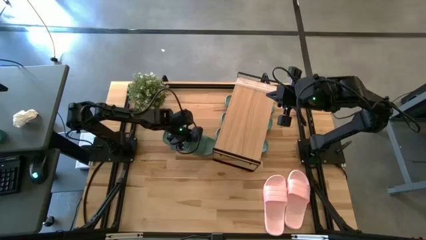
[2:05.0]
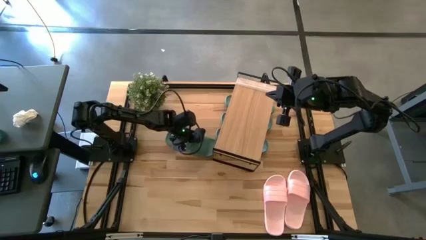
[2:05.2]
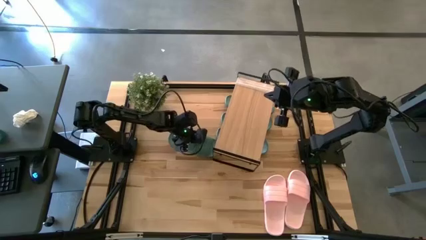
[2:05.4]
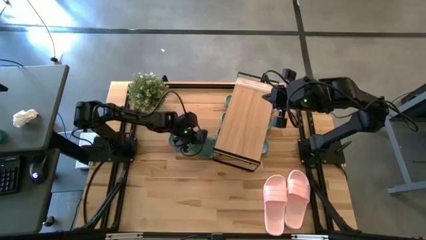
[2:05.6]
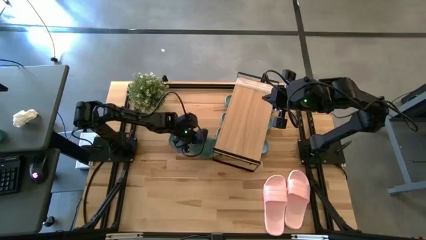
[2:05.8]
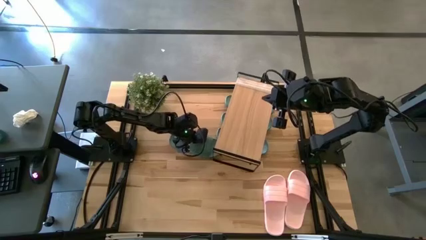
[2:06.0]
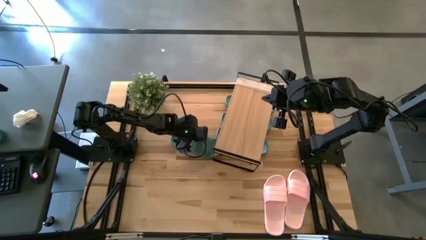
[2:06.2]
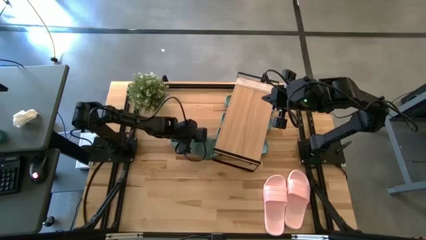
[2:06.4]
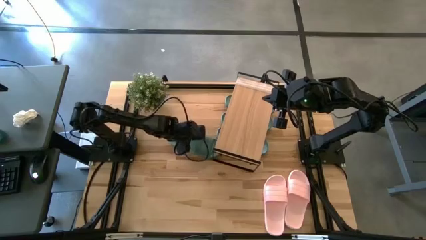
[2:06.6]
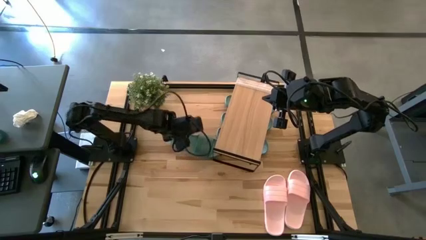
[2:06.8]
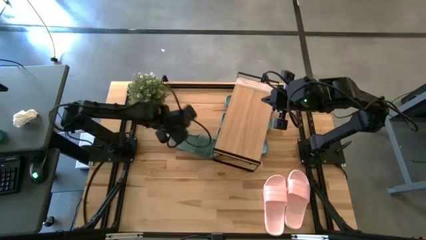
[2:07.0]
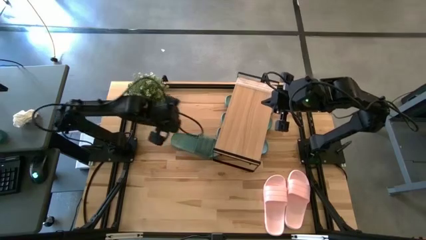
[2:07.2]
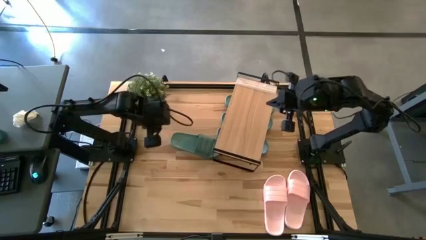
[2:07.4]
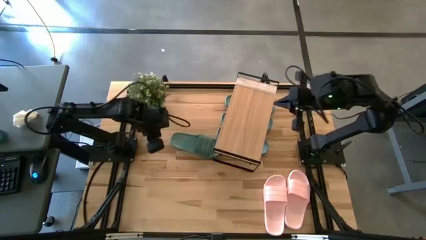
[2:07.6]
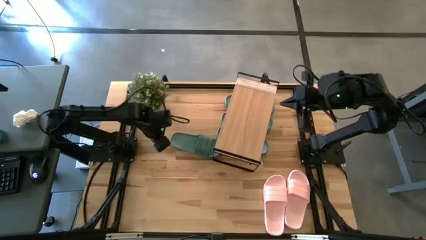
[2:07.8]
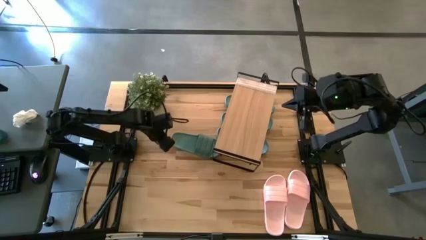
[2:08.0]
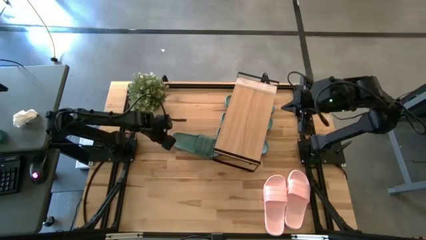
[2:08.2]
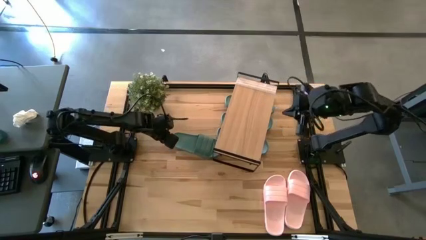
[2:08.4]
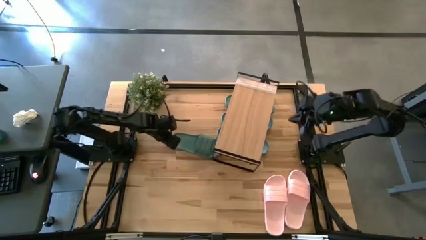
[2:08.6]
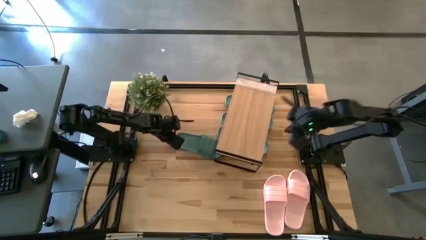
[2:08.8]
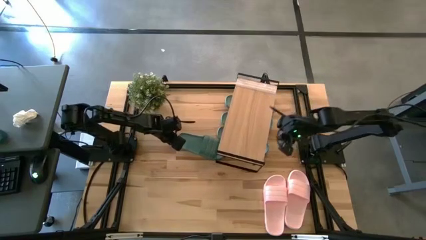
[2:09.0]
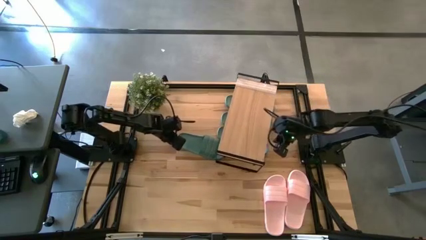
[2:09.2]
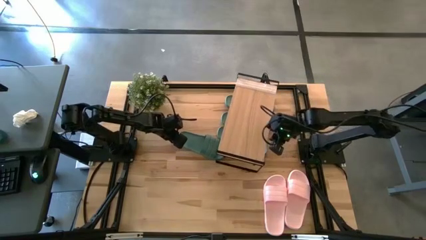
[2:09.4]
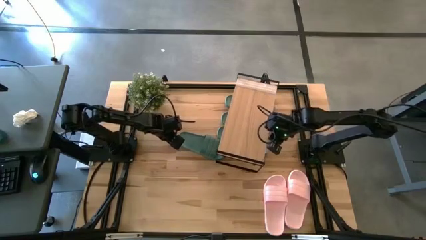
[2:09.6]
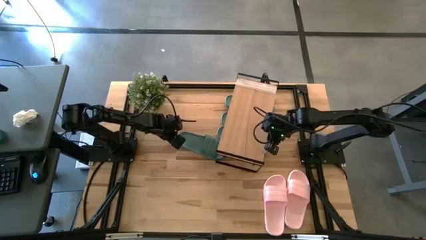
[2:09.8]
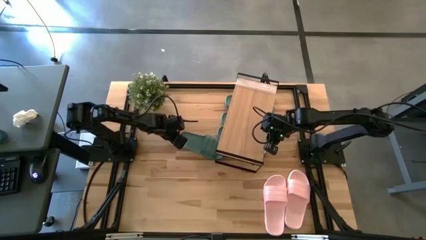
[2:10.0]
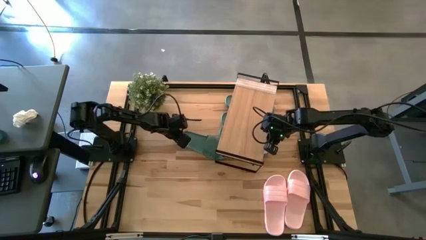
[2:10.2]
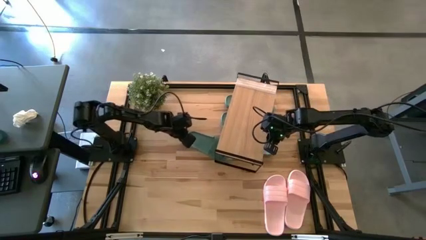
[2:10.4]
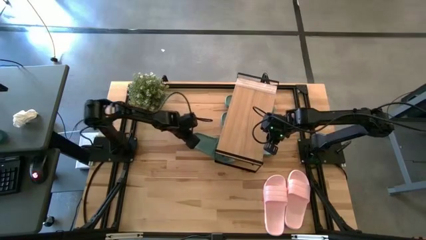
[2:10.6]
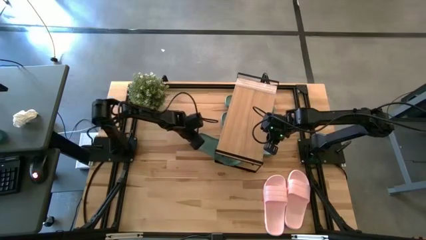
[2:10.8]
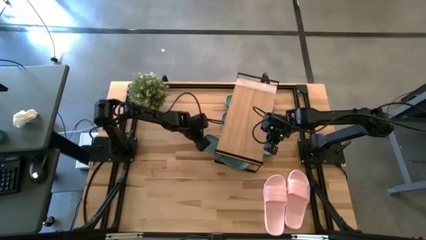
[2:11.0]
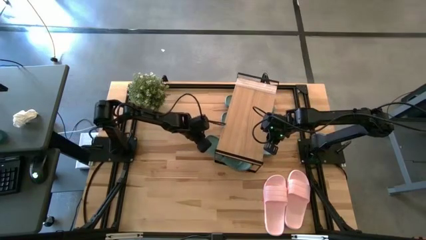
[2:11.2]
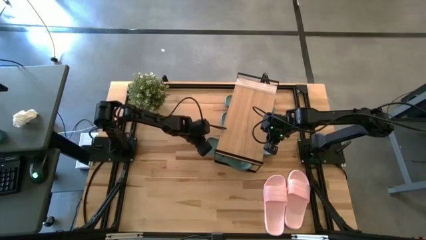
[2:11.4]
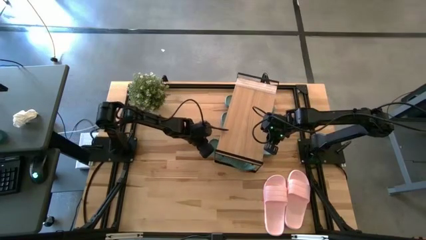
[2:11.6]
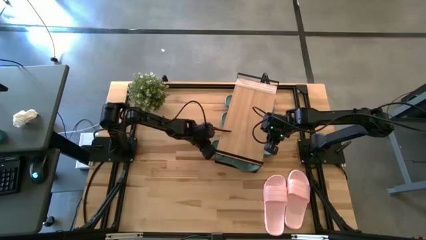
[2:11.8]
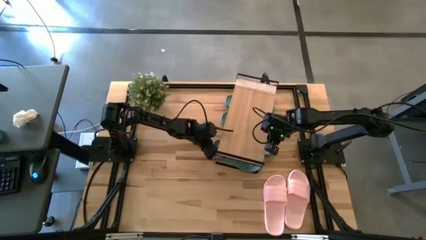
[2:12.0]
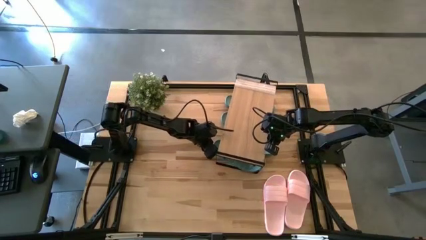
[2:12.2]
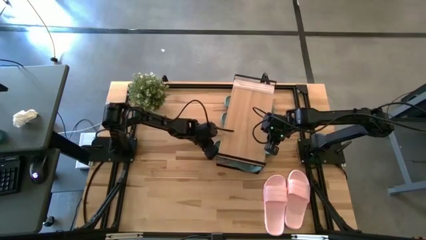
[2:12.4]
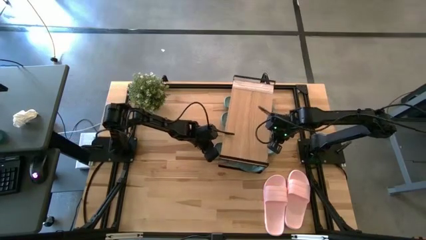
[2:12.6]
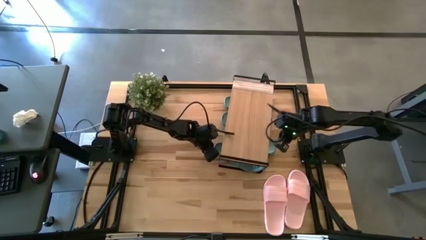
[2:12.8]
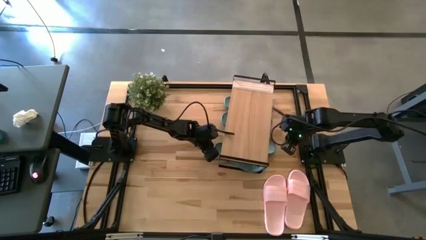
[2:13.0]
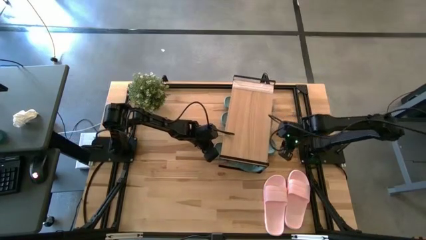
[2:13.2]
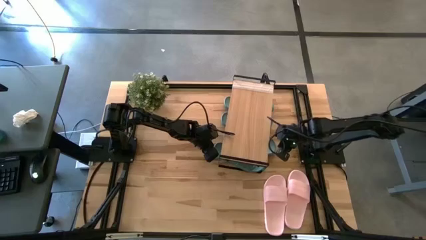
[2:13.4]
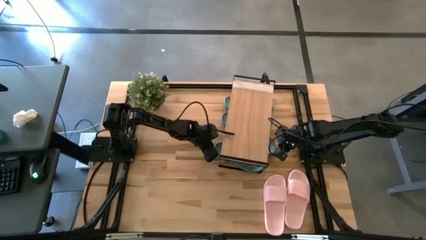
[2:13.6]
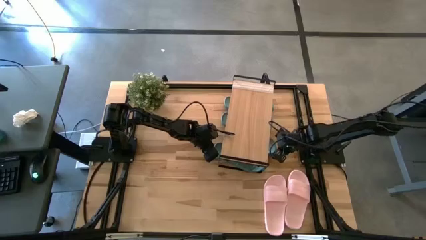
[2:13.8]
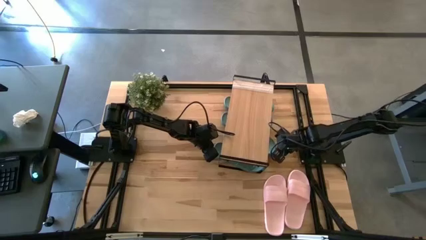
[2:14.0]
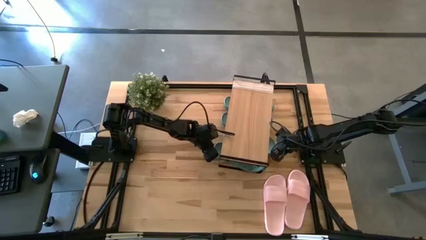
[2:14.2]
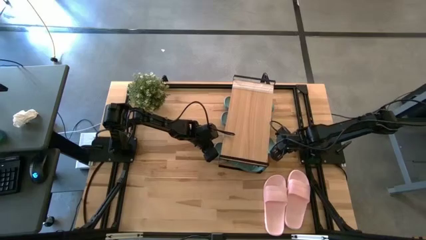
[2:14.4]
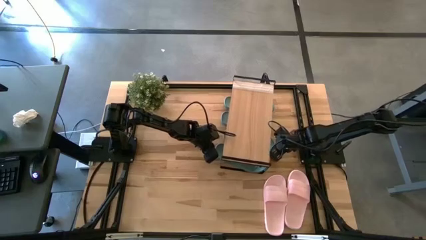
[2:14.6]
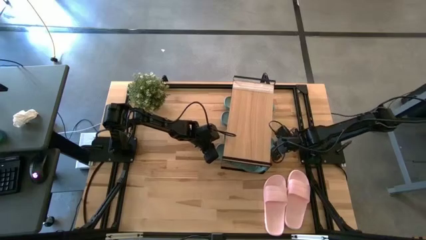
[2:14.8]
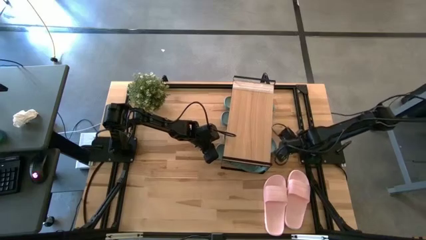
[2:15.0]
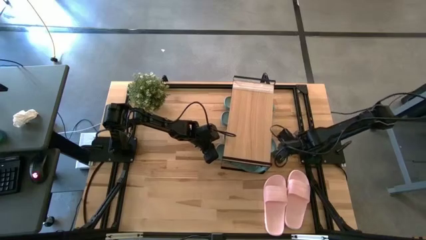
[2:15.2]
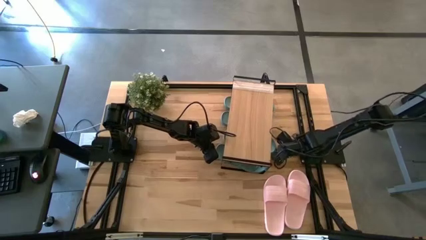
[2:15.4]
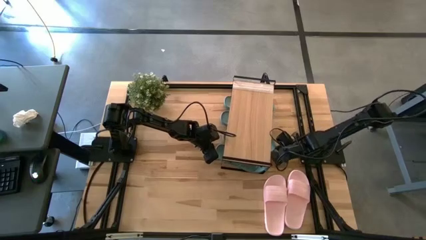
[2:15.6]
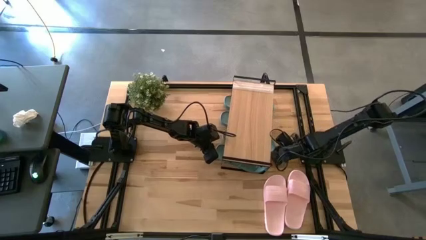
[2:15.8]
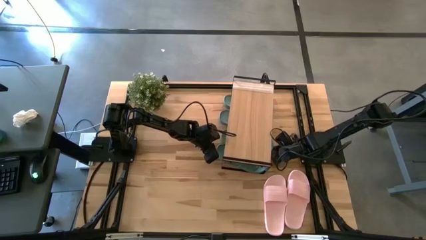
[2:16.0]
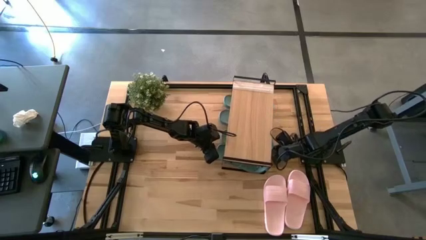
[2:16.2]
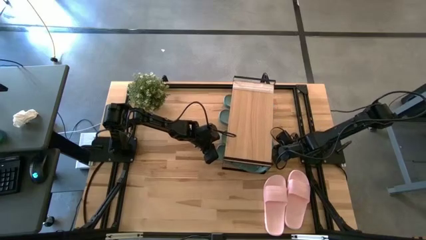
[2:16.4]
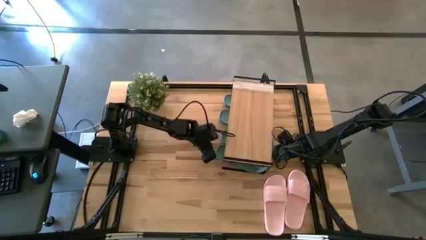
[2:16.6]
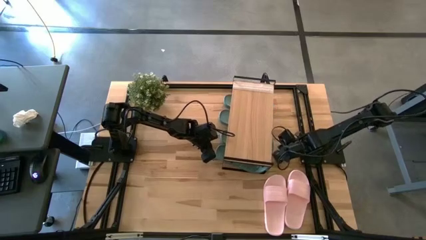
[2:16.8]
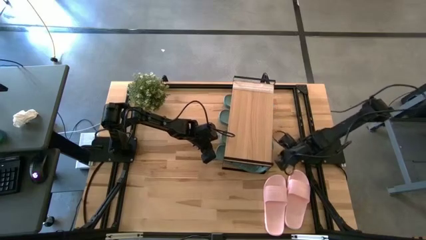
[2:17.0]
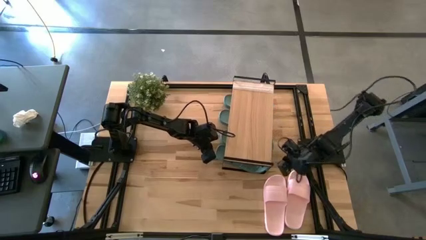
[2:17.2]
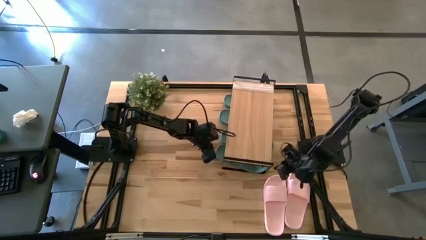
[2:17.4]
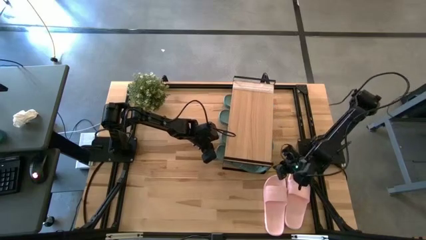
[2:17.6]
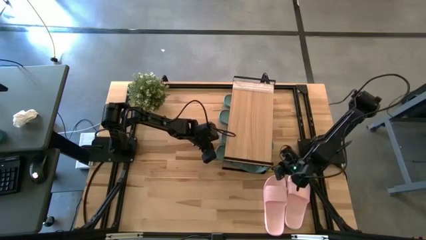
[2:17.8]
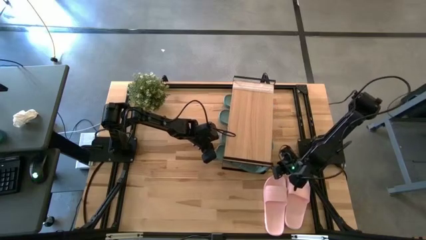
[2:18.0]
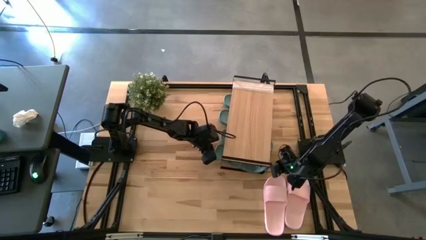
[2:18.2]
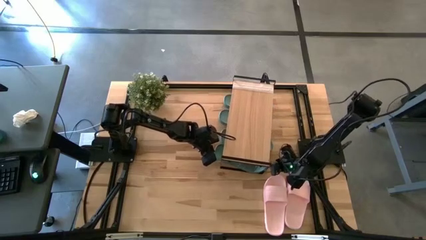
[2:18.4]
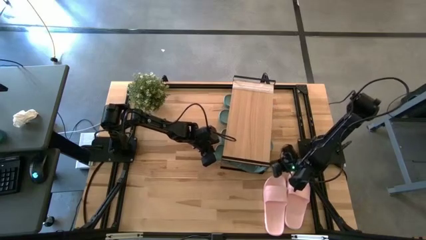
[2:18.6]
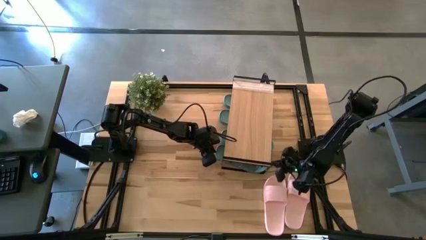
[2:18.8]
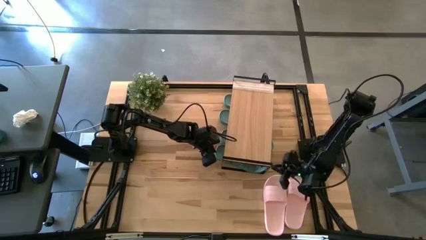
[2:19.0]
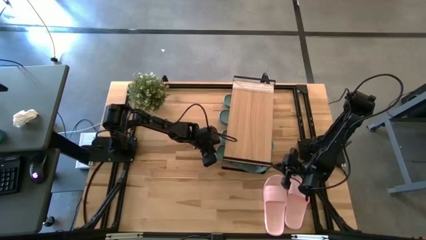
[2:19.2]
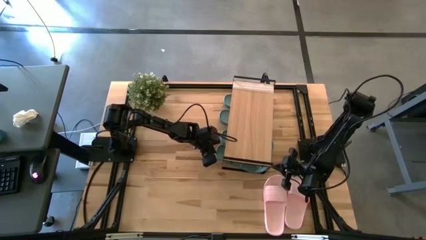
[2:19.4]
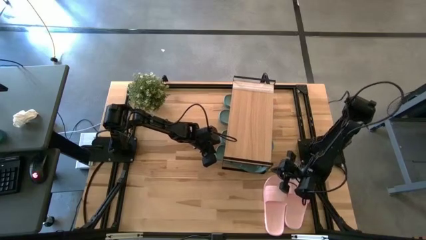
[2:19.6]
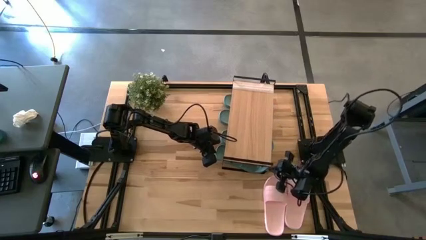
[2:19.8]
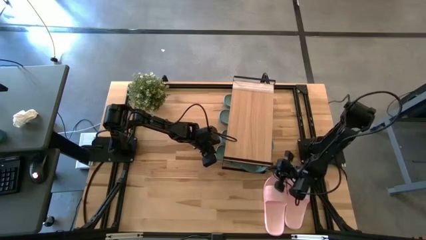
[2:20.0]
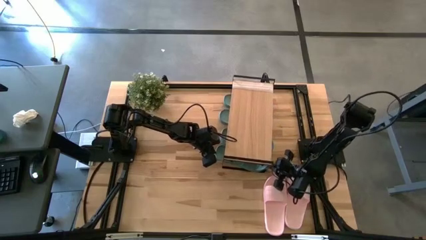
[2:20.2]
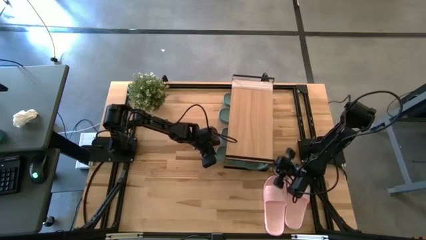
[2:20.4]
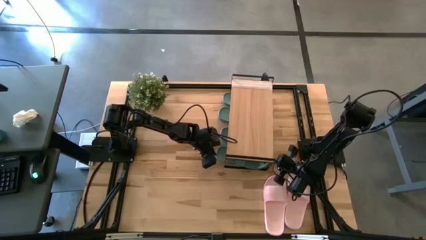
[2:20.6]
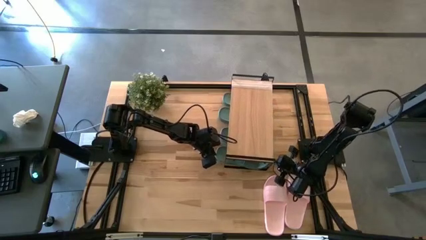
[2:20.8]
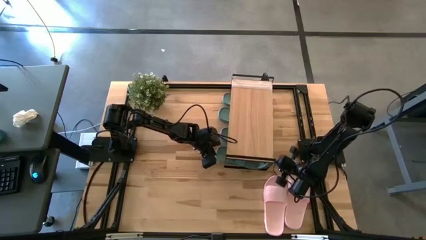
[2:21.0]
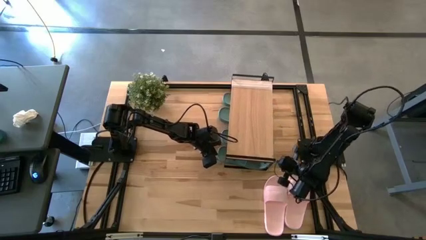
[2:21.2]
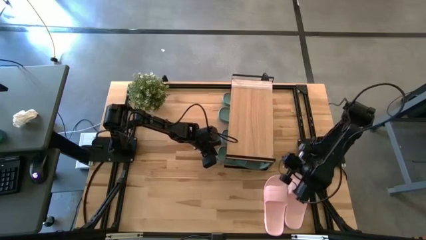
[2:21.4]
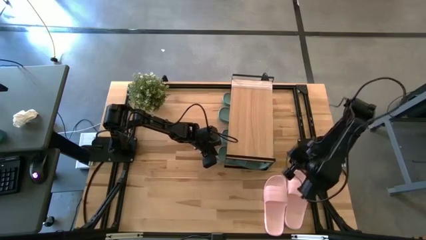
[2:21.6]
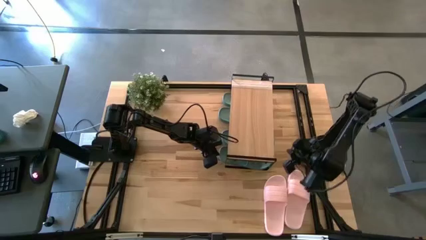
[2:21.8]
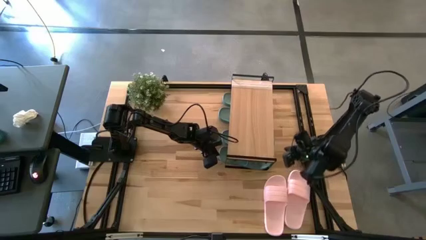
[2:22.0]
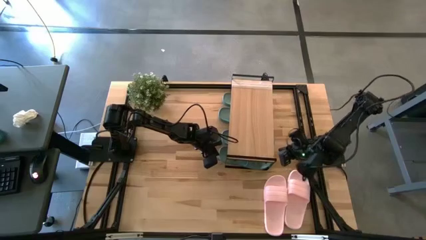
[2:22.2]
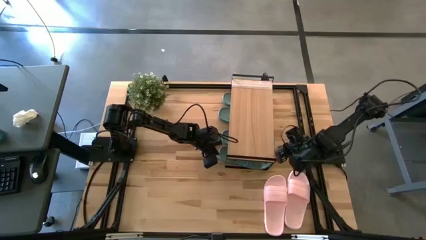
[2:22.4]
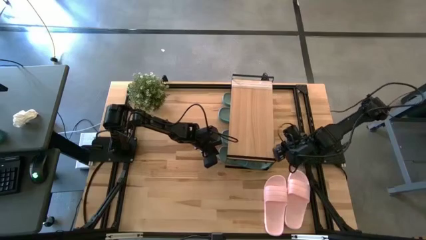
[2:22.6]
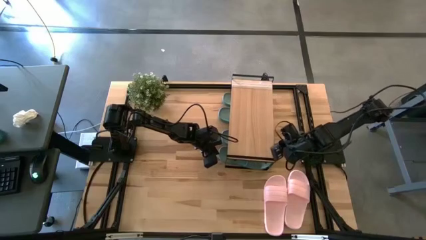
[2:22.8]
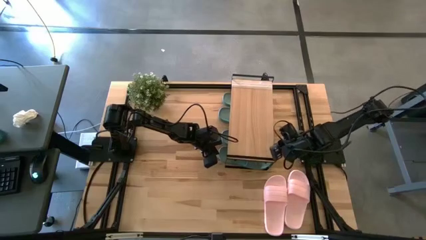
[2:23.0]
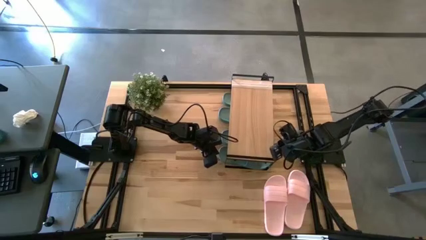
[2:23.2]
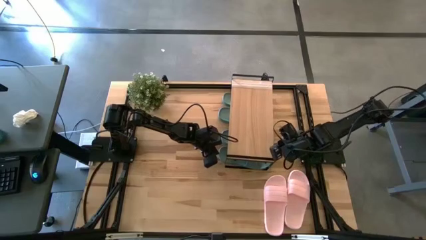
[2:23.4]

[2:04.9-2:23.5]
Task: Pick and place slides into the shelf
Put the green slide under the shelf
